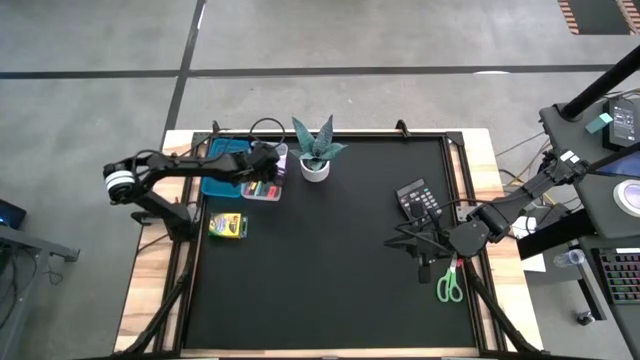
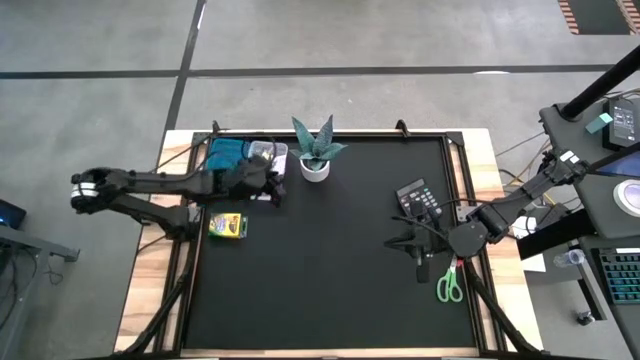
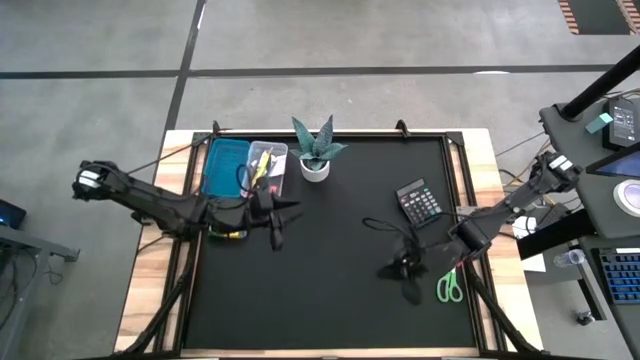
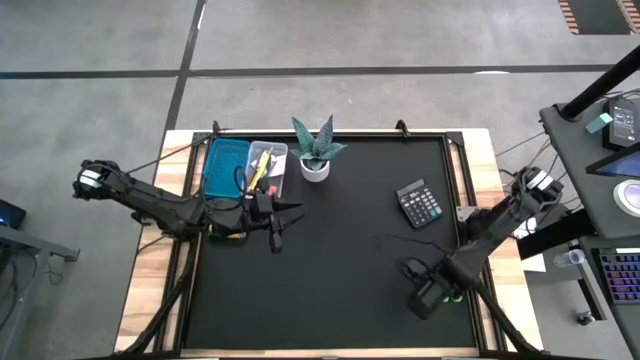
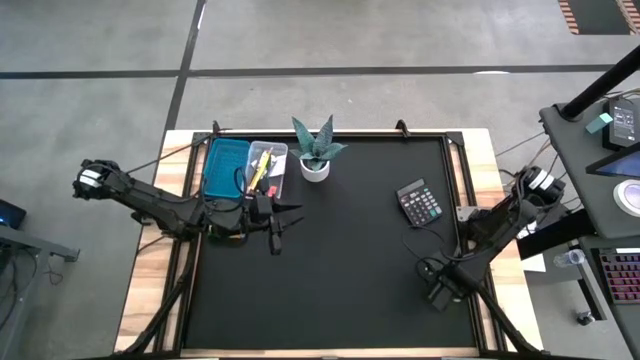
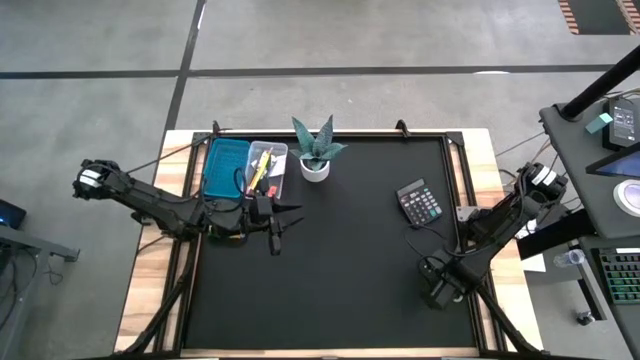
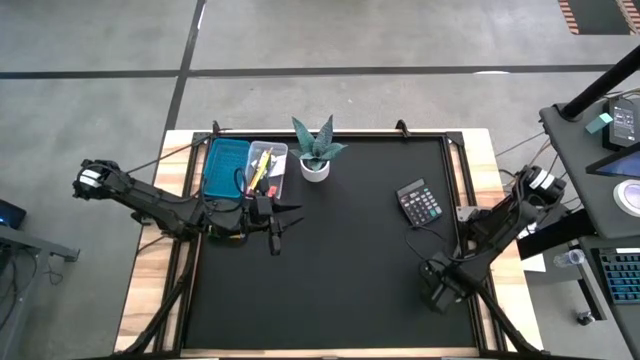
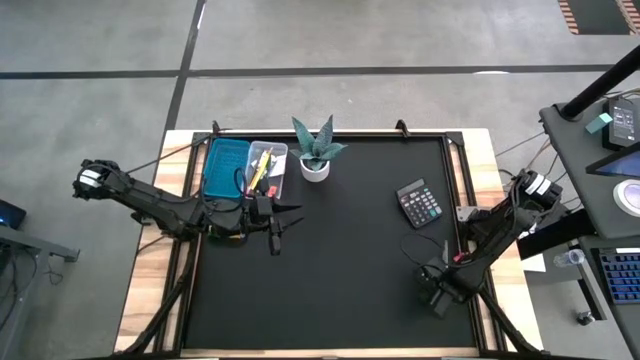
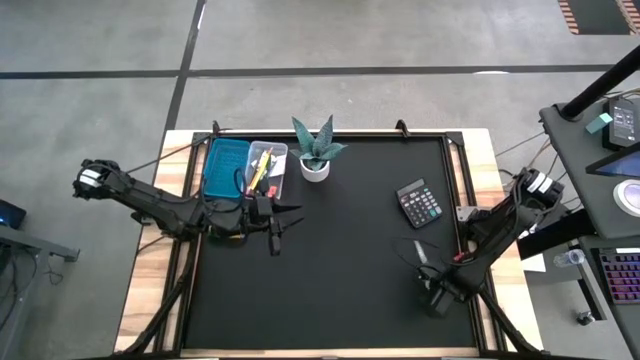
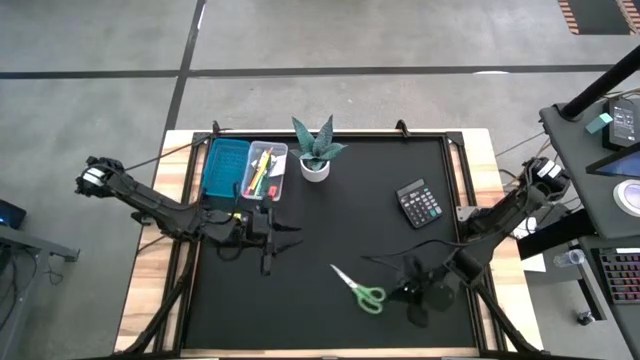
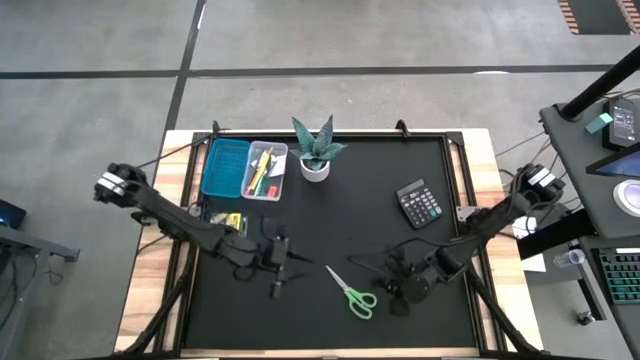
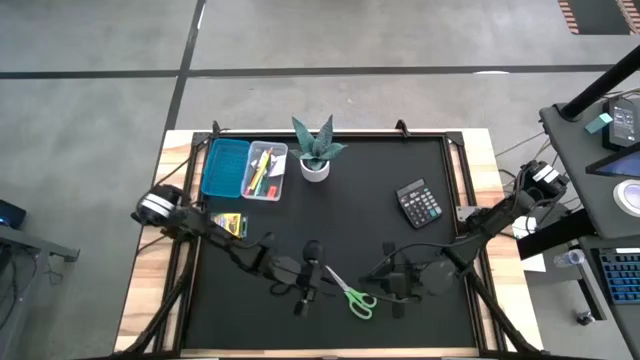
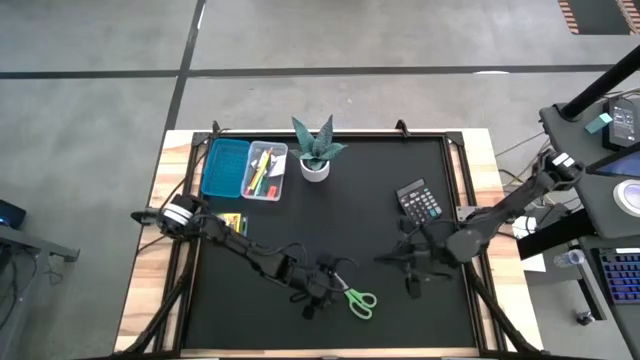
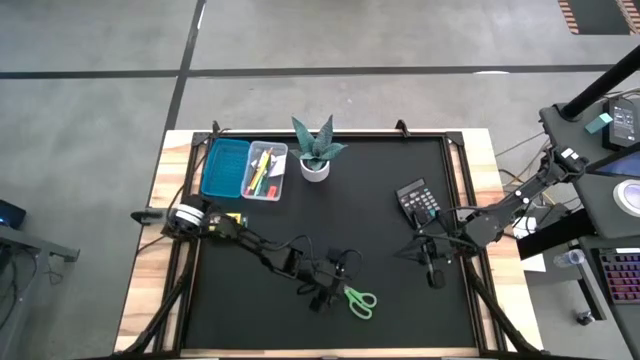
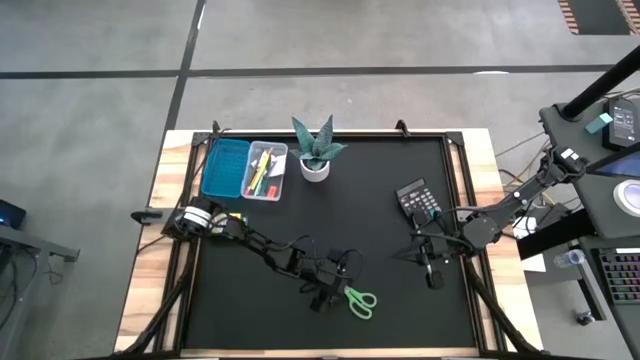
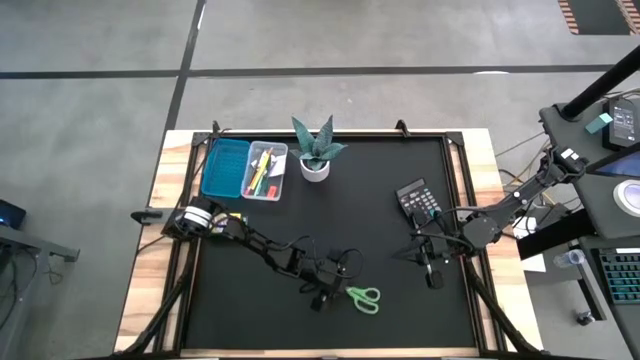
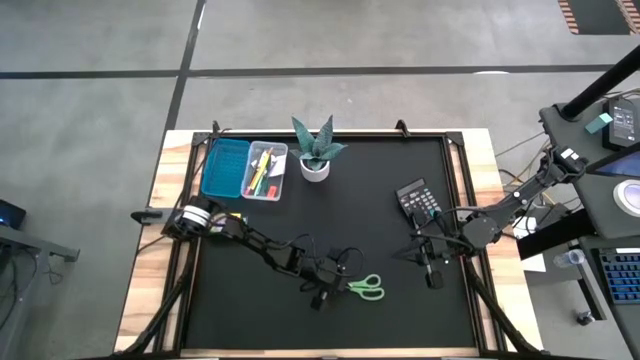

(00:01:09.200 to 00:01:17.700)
Task: Pack school essentials
Put the green scissor into the blue supply box

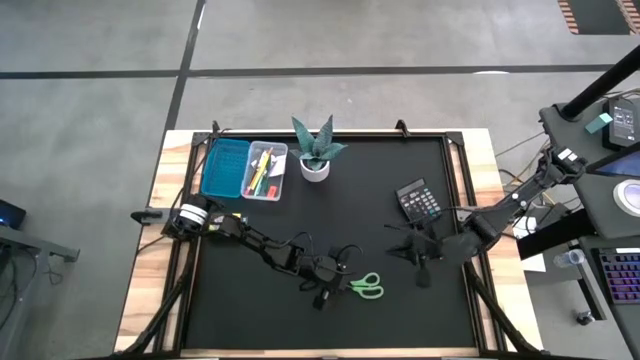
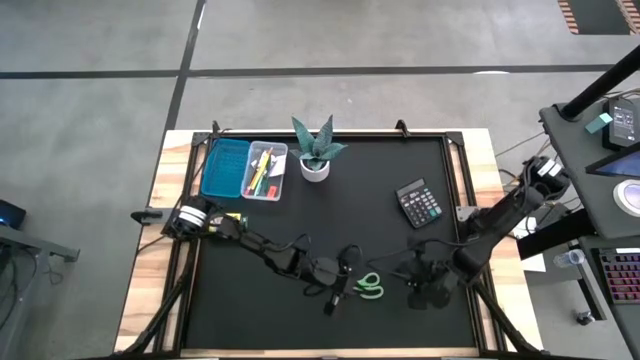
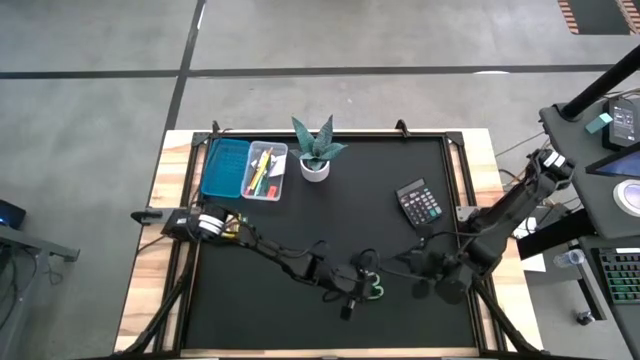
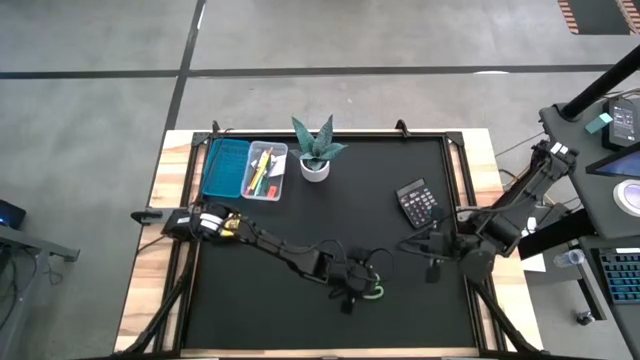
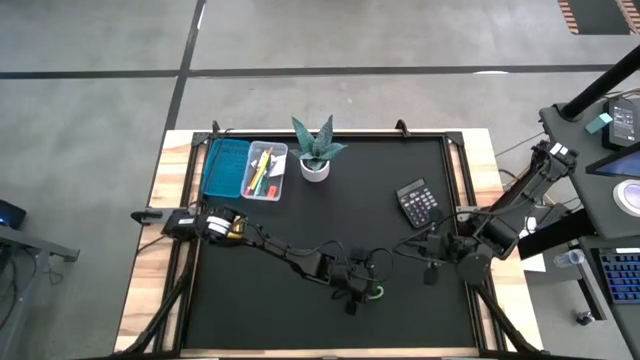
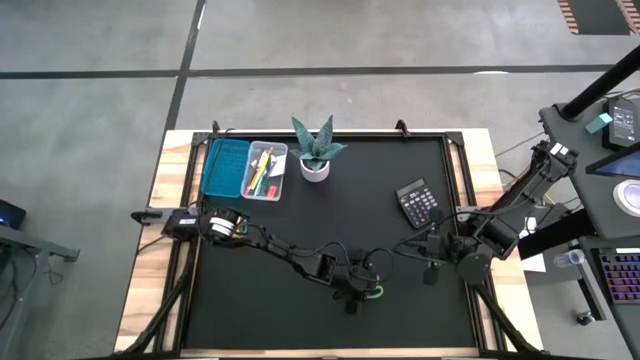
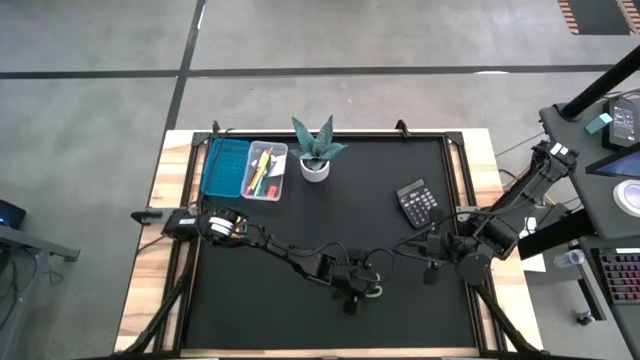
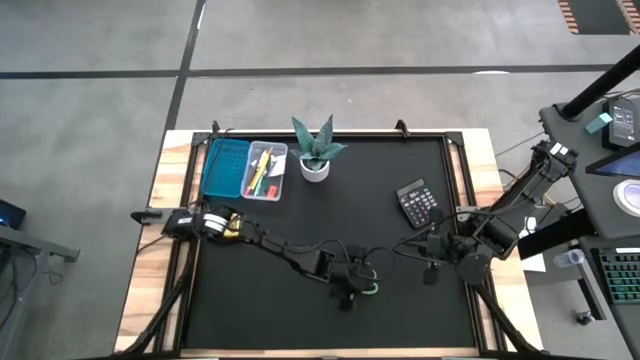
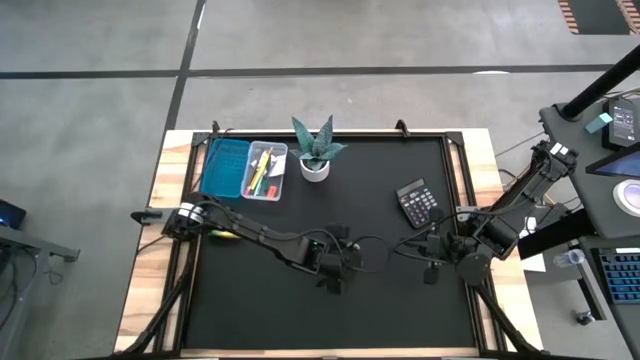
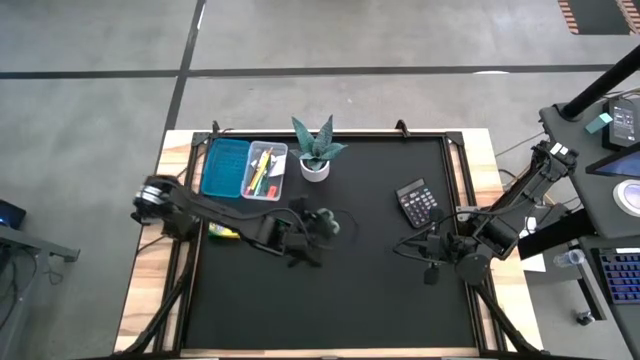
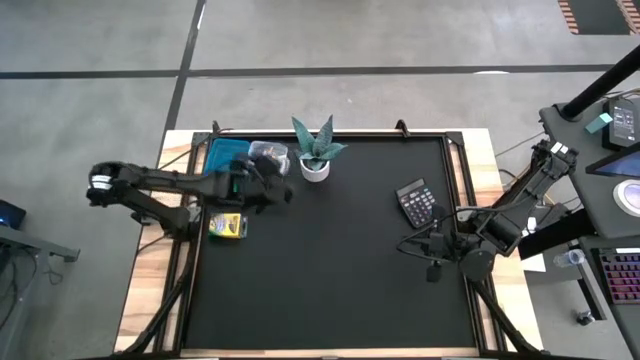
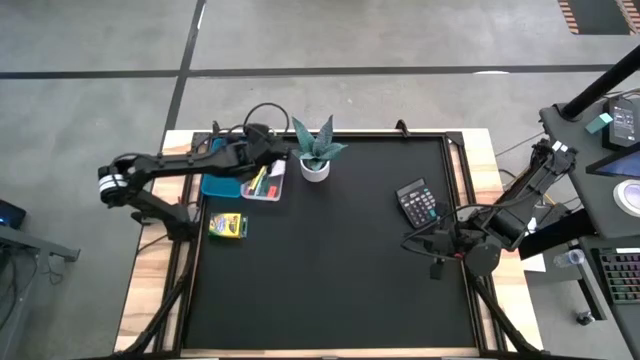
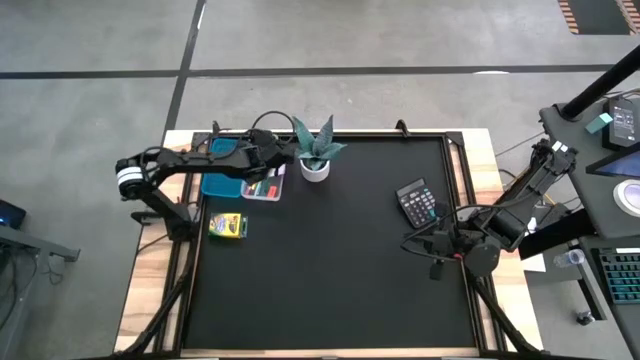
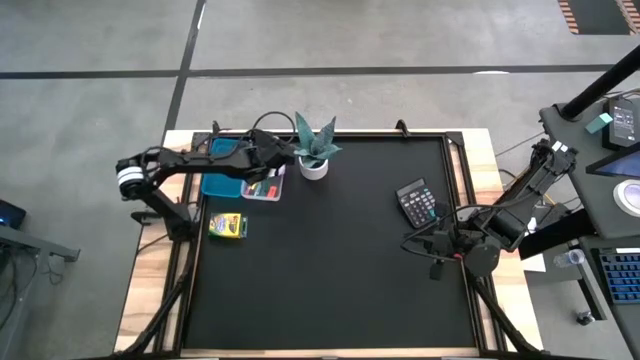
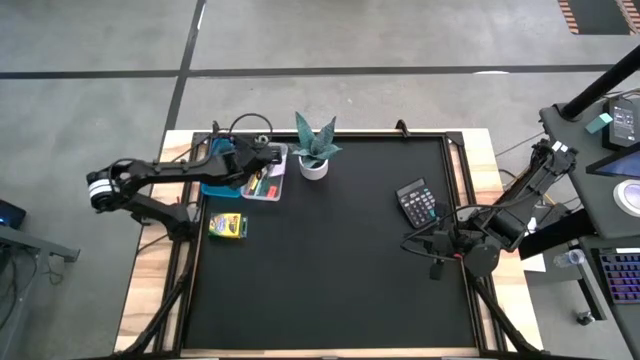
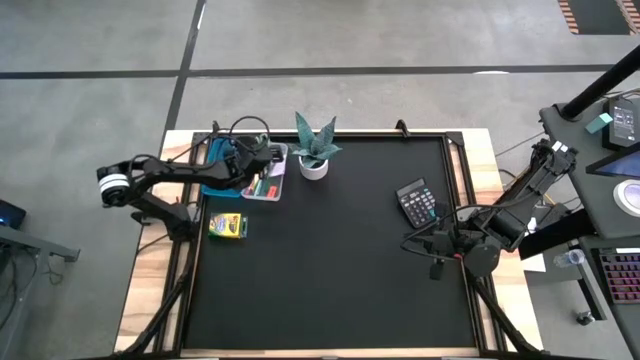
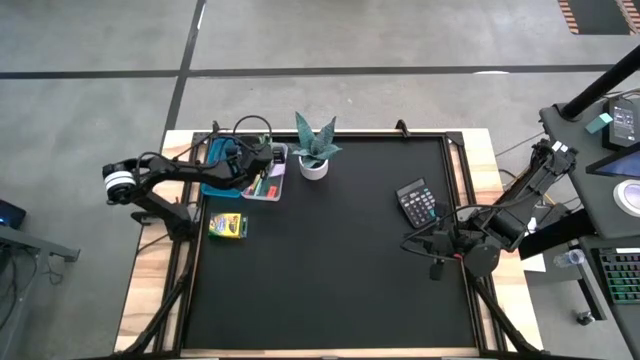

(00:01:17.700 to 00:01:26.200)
Put the green scissor into the blue supply box

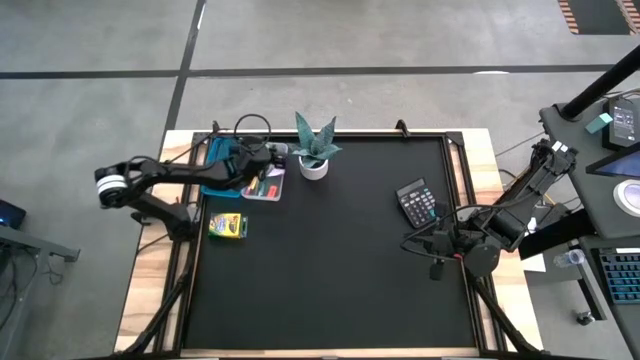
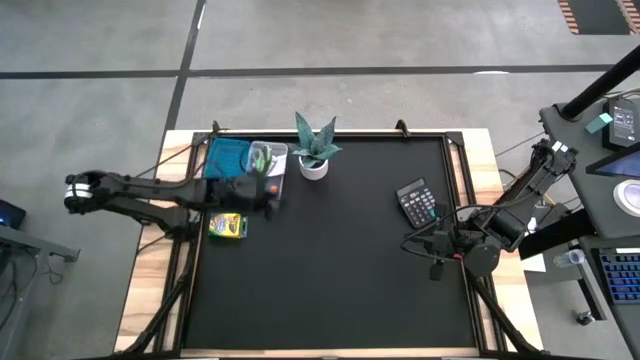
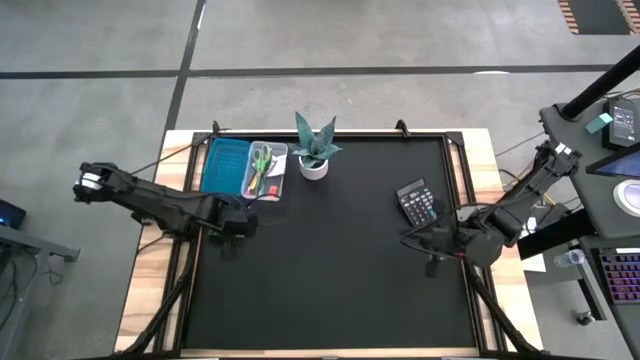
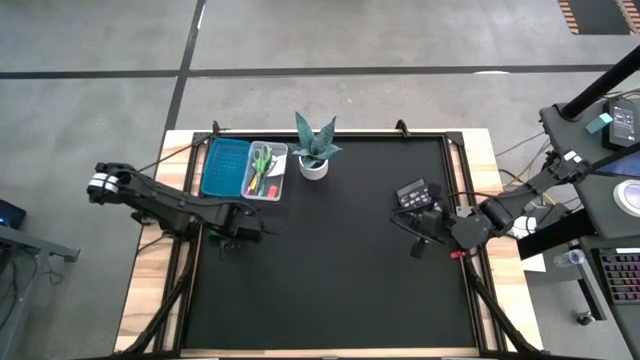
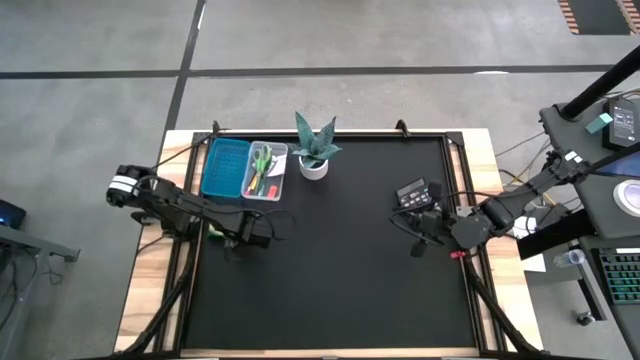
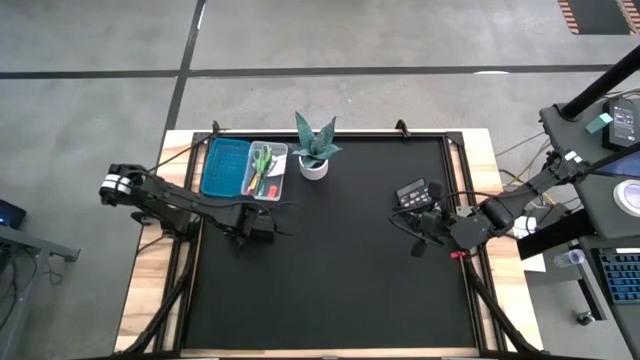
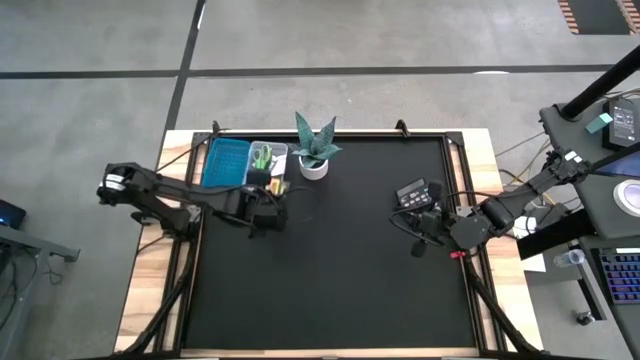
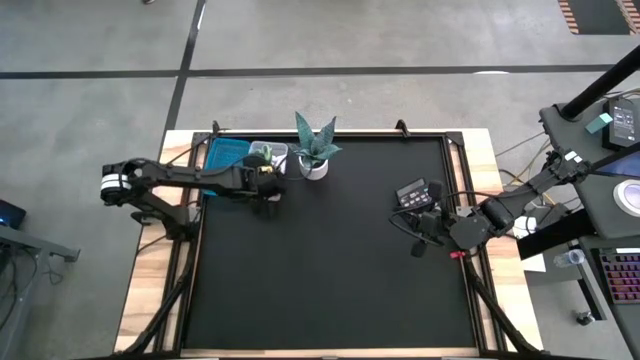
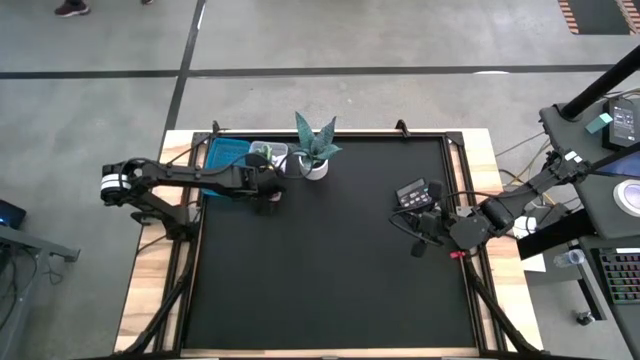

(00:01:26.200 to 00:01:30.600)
Put the box of crayons into the blue supply box
